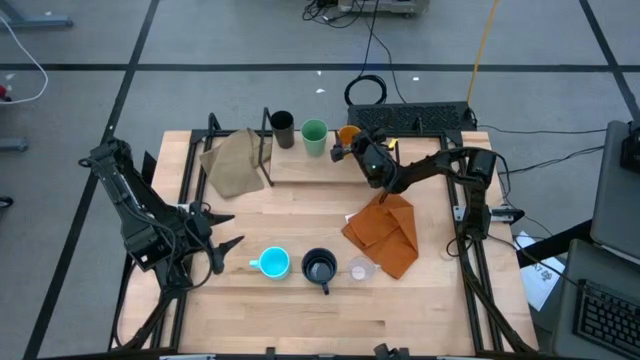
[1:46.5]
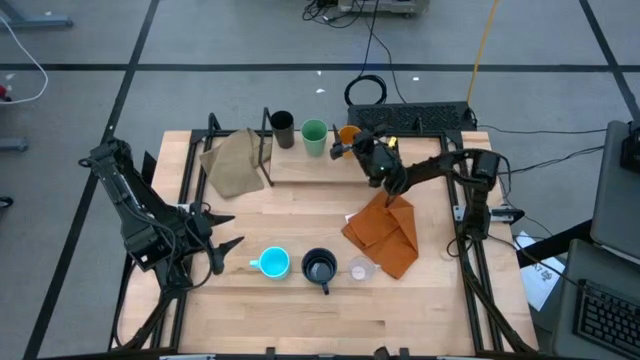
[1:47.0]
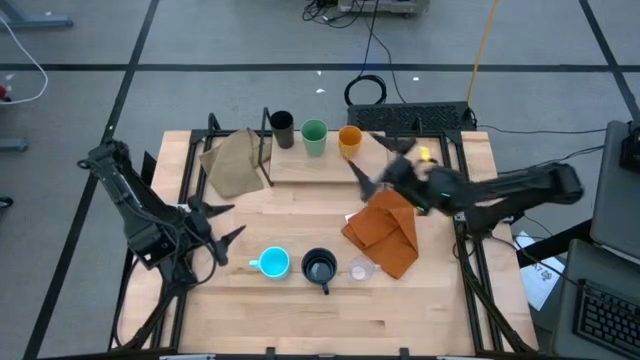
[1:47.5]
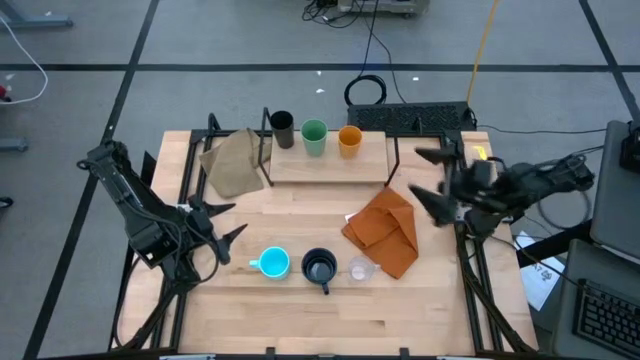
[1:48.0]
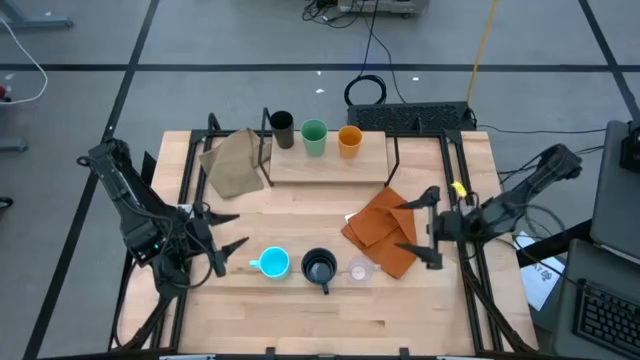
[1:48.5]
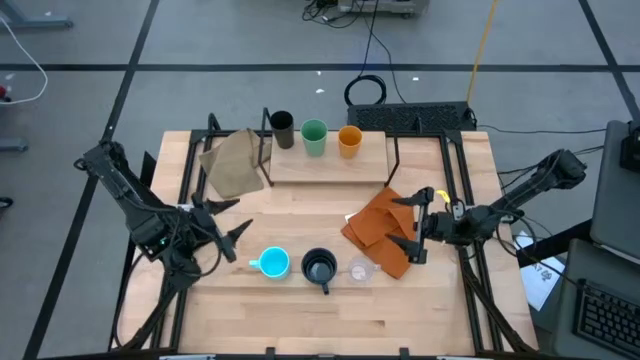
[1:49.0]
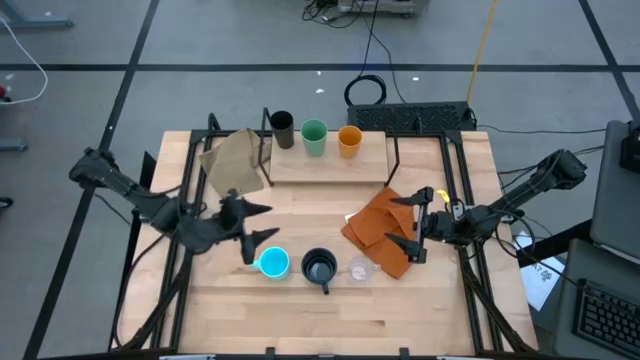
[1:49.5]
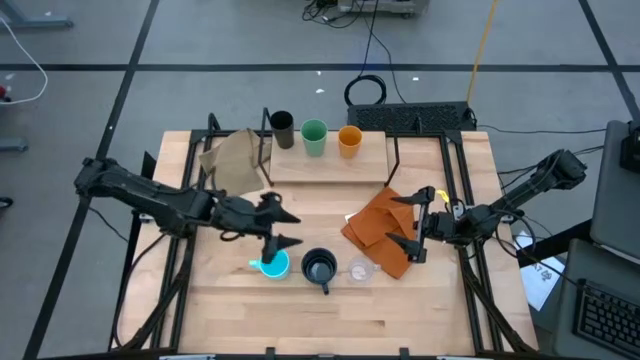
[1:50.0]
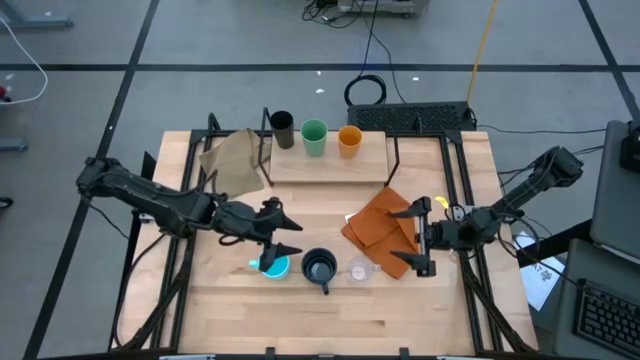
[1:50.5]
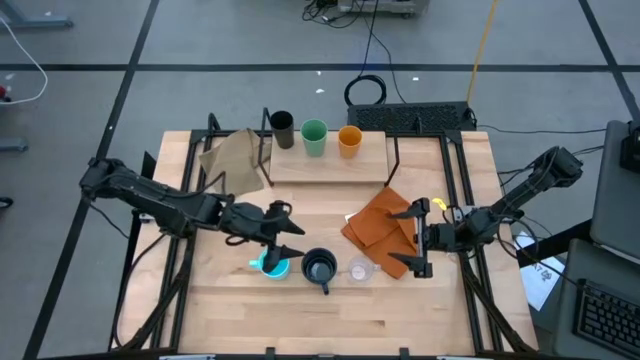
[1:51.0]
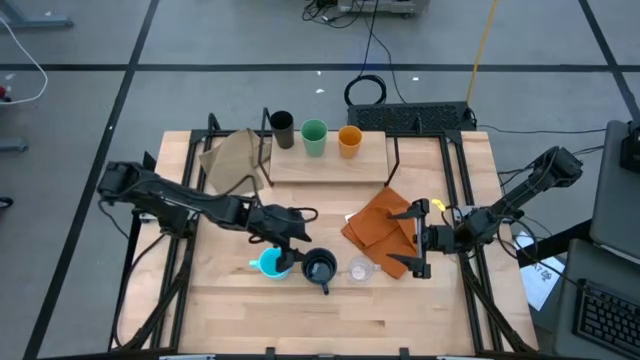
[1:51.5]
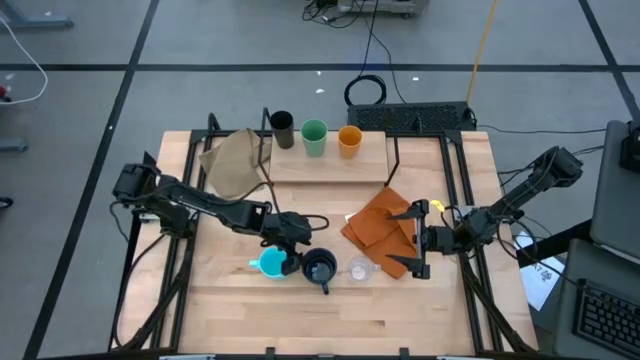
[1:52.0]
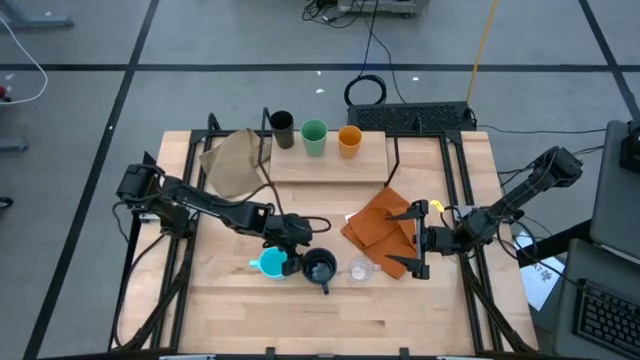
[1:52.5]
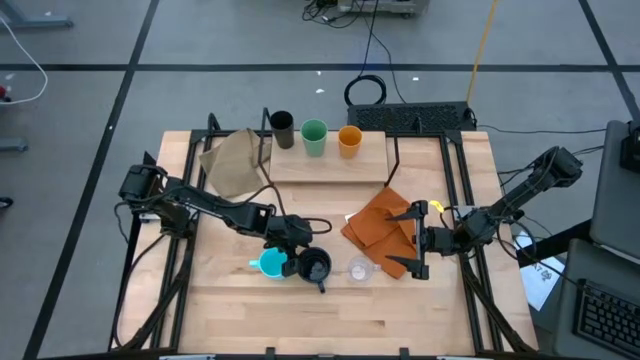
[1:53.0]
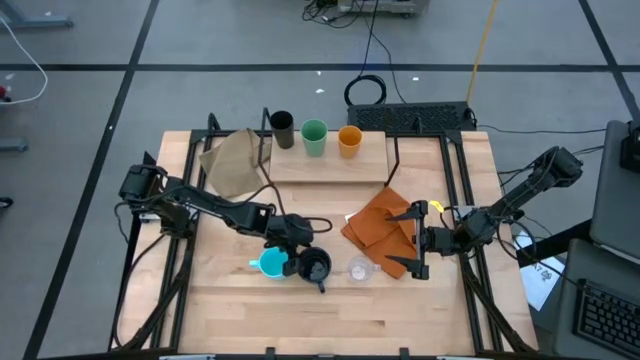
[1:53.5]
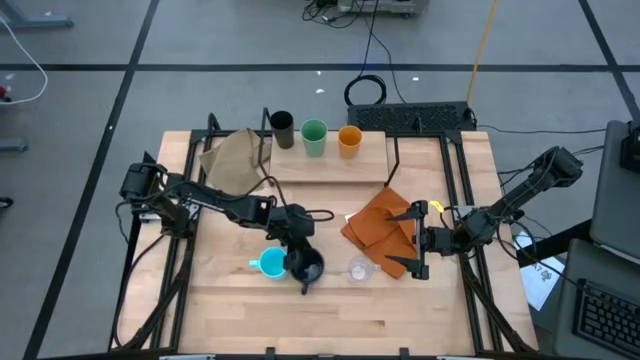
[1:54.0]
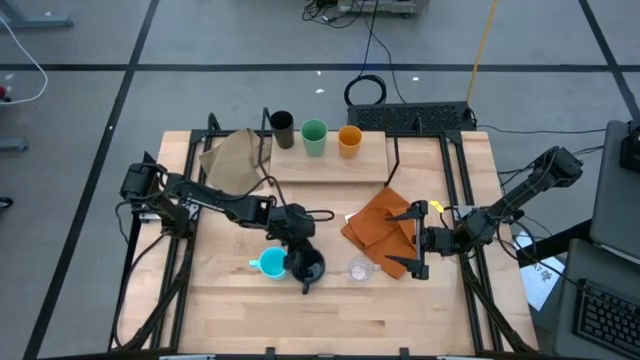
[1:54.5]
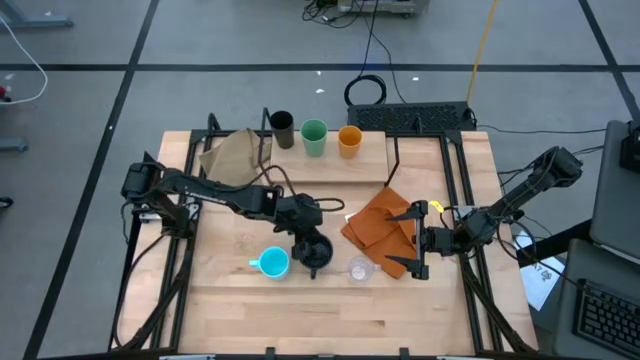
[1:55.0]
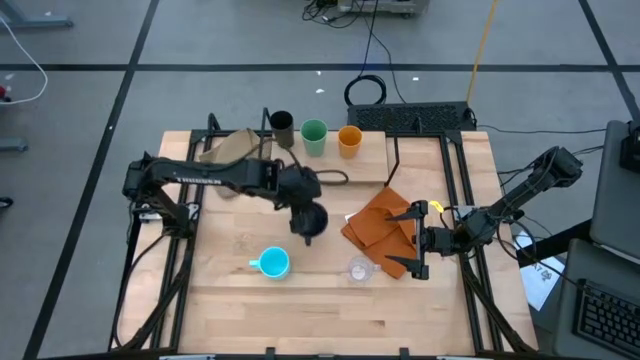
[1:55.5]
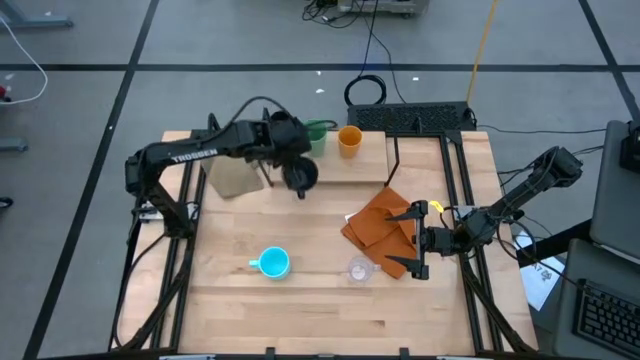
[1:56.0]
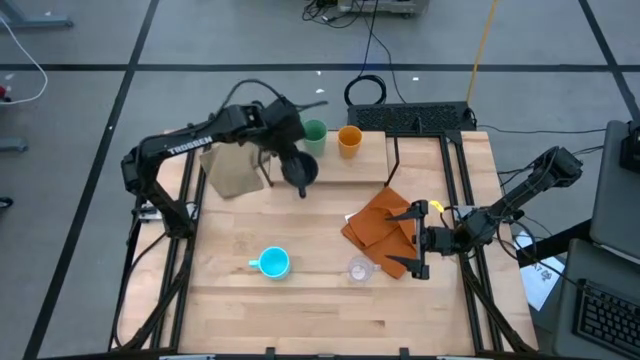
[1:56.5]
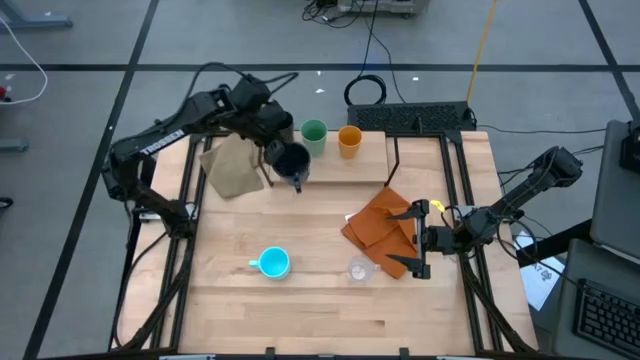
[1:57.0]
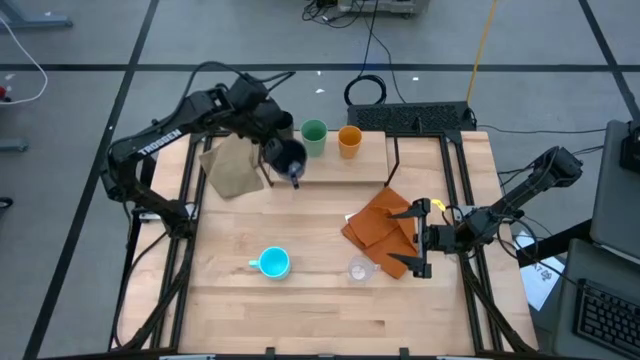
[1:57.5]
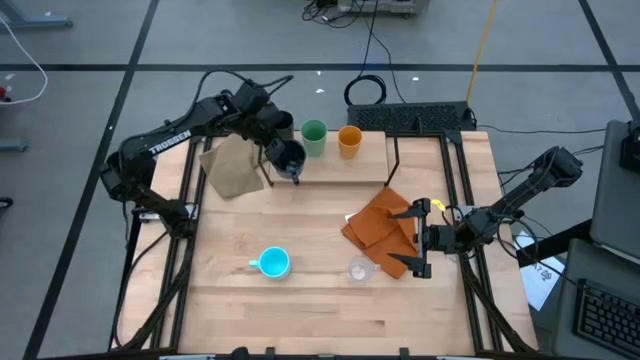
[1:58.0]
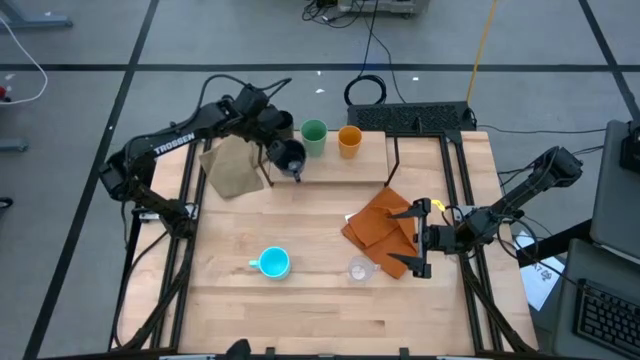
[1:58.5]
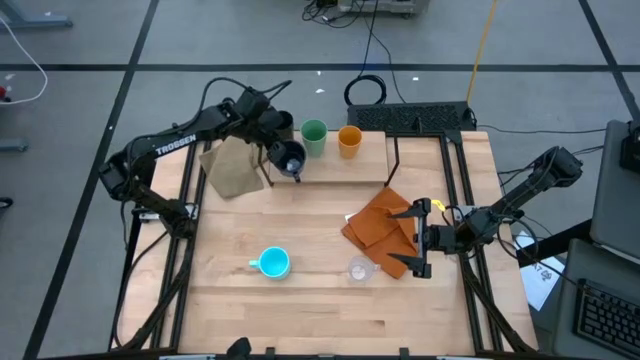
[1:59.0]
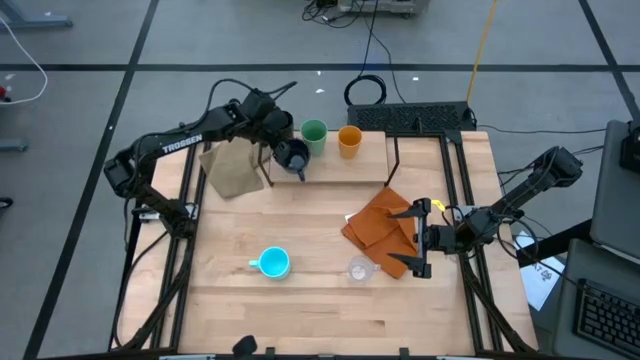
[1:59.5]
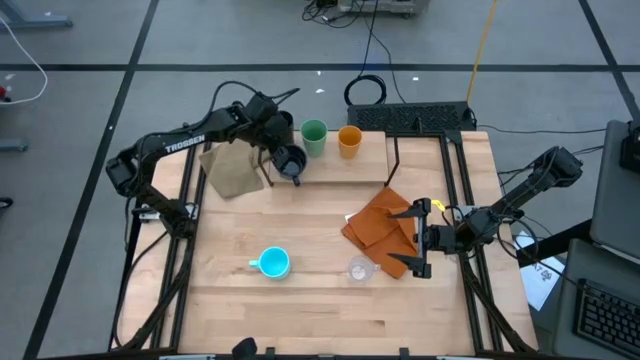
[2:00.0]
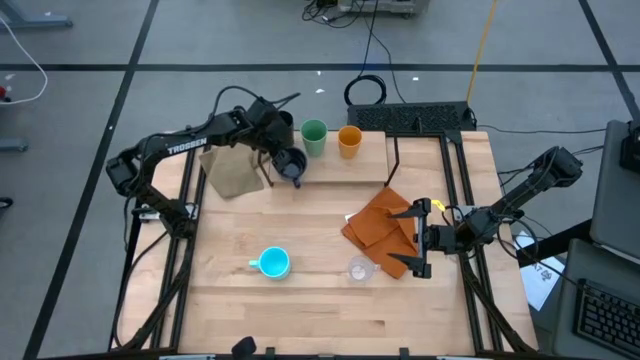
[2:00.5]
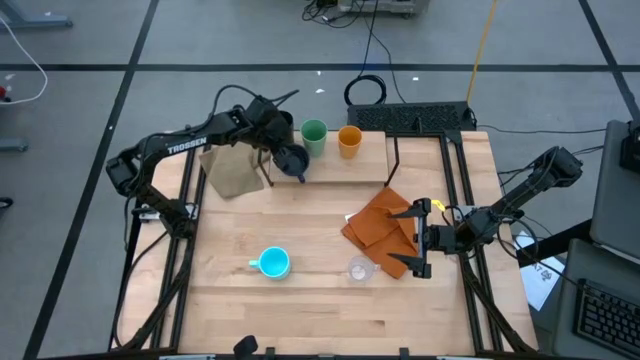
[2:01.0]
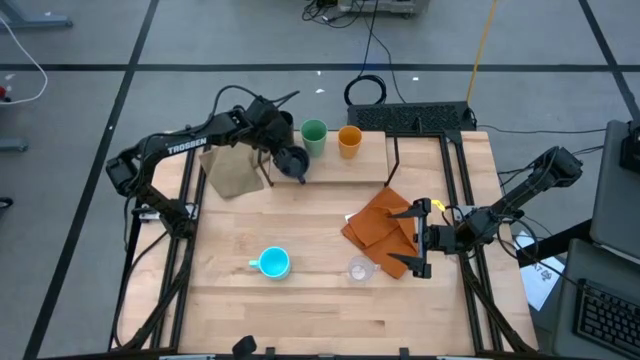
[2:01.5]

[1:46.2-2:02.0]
Task: Stack small to large cups/mugs on shelf
Put the dark blue mug on the shelf

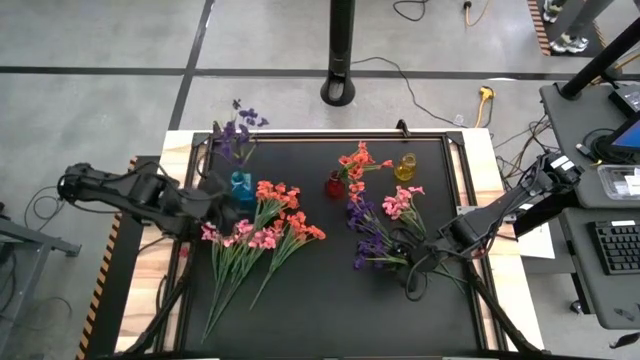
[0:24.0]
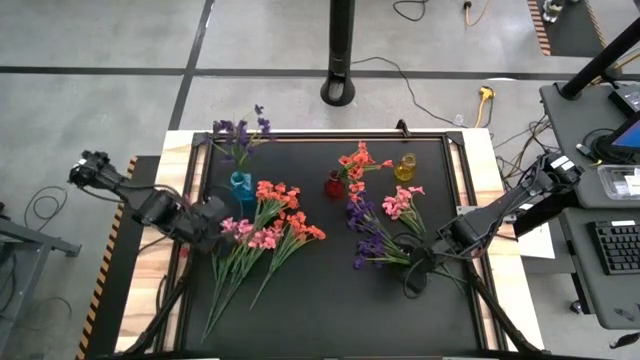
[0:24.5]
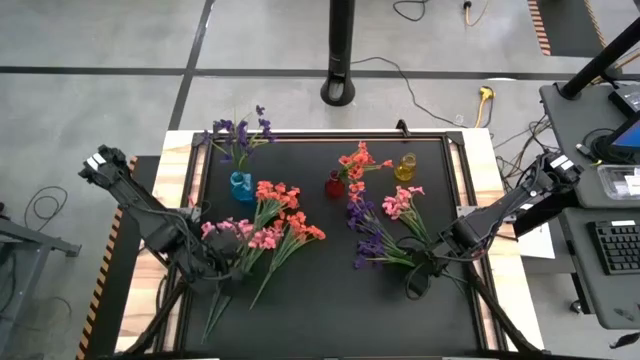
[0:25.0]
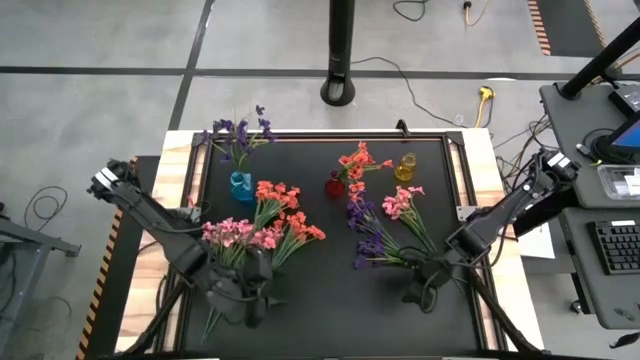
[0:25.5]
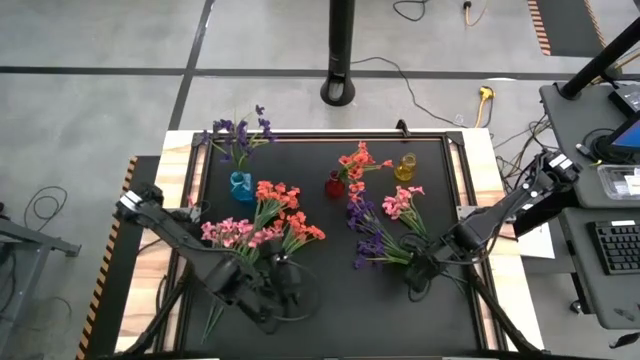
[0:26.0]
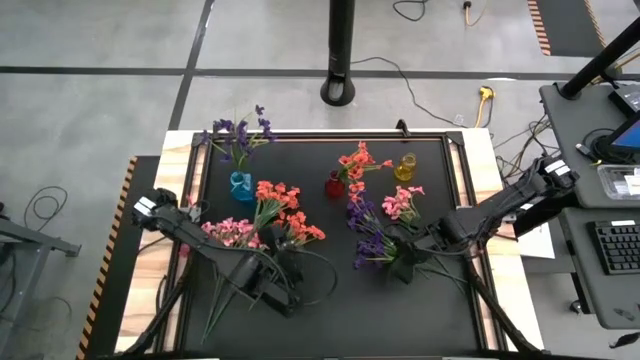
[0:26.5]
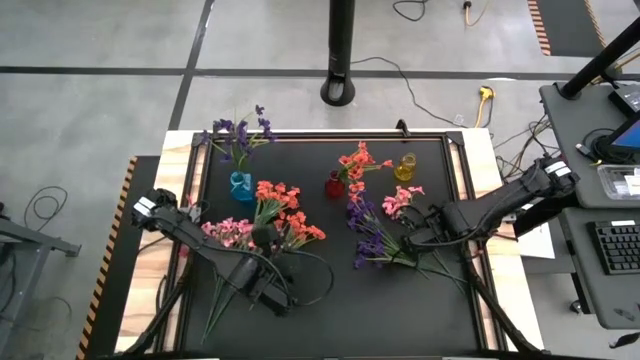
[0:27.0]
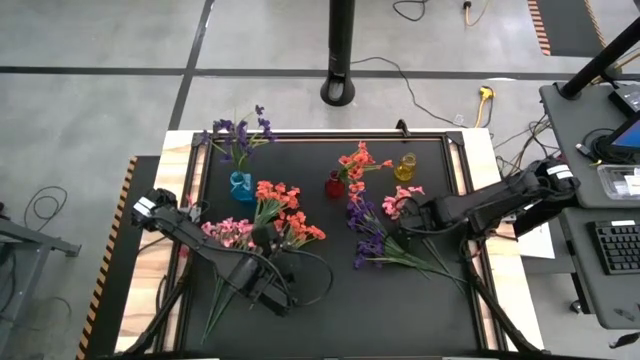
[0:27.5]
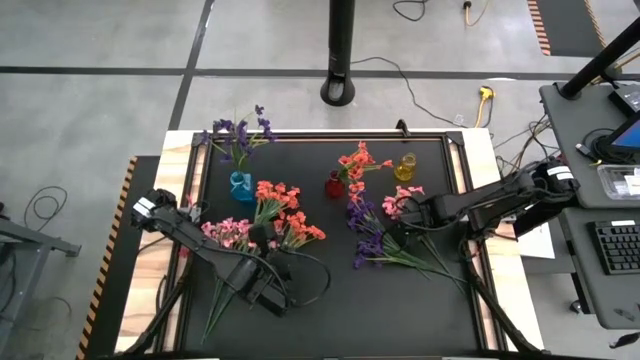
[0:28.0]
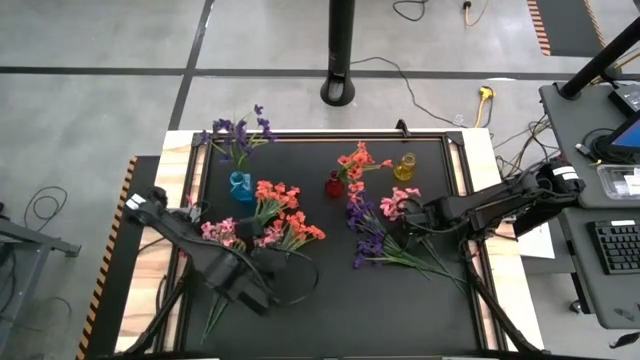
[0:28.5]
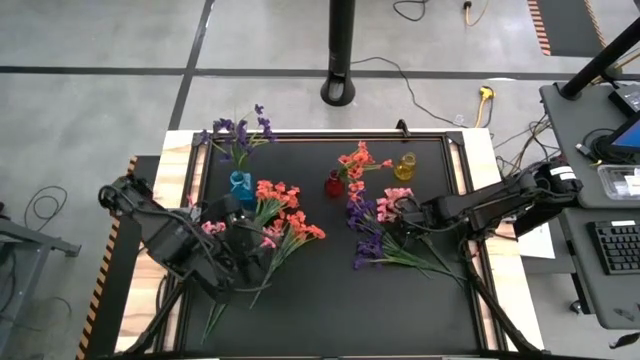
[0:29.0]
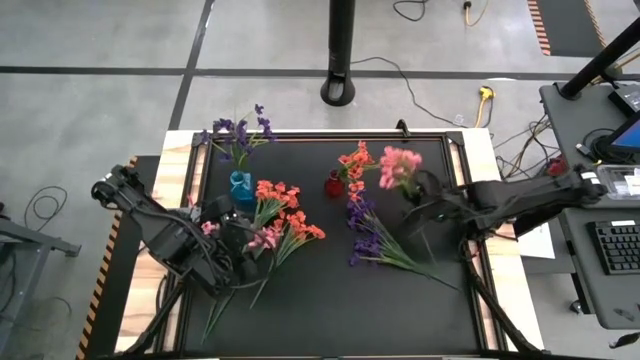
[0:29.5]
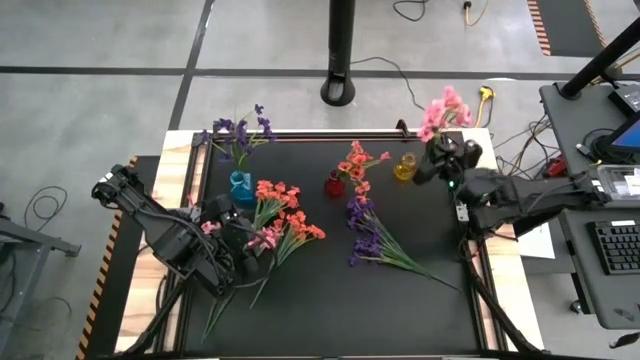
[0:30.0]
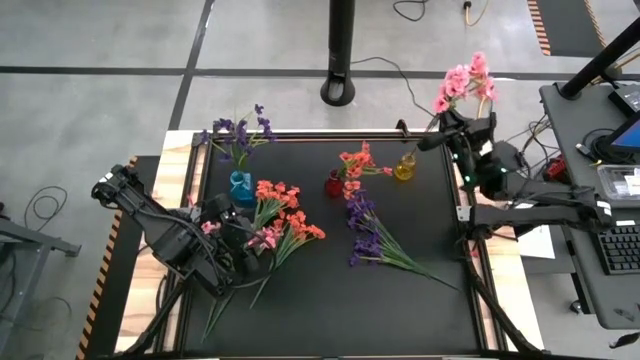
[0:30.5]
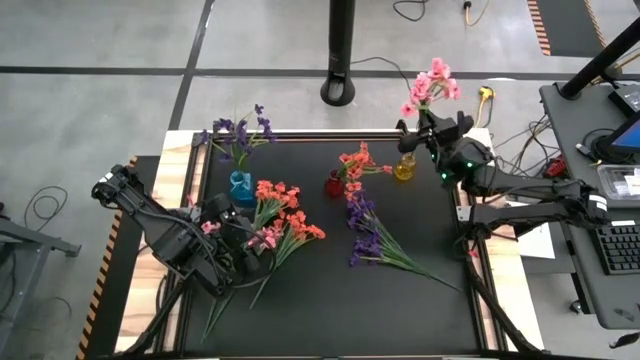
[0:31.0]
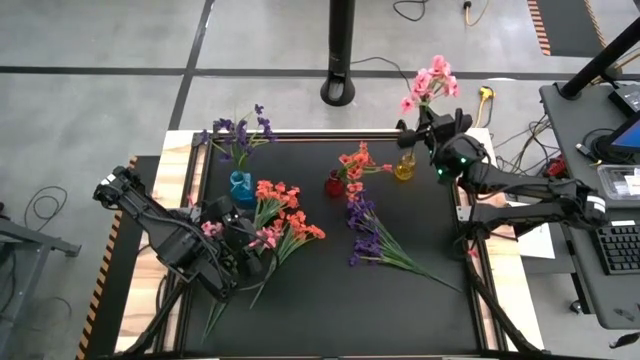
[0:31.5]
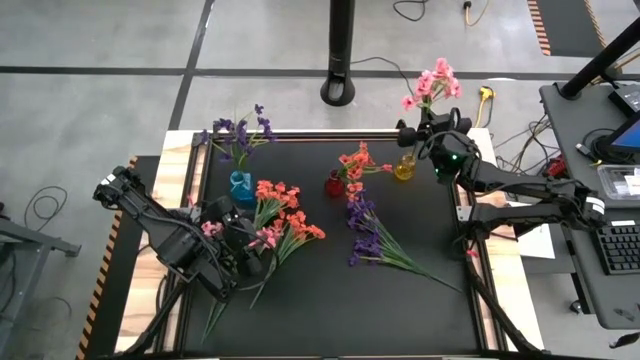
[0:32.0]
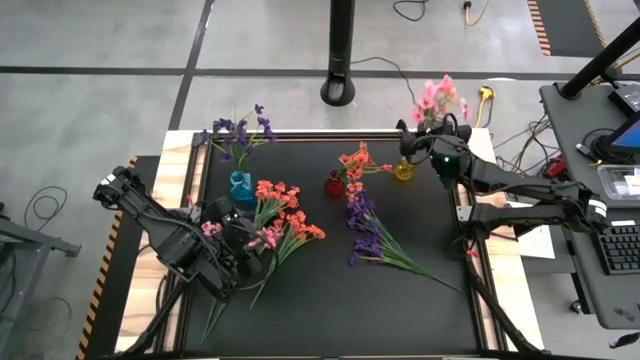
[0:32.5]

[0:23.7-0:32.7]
Task: Sort flowers into vase by color
Put the top pink flowers into the yellow vase
